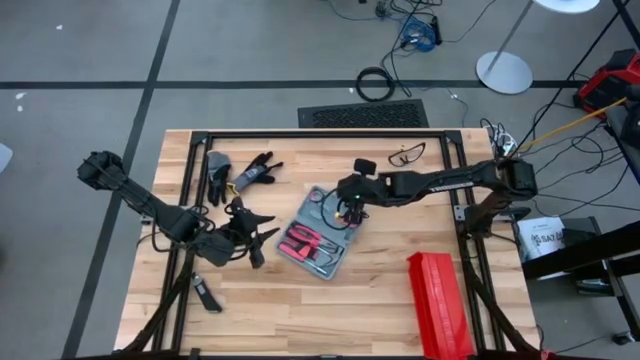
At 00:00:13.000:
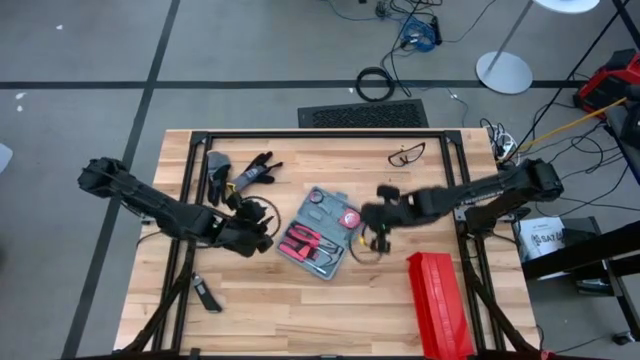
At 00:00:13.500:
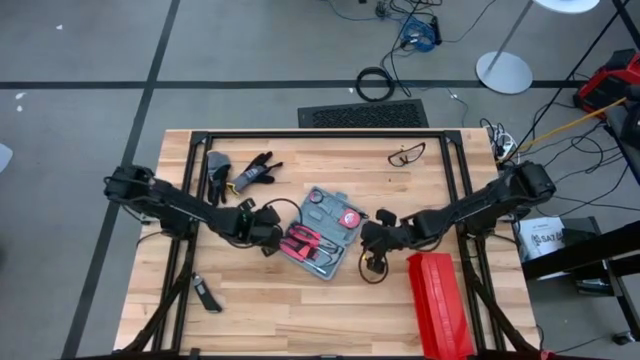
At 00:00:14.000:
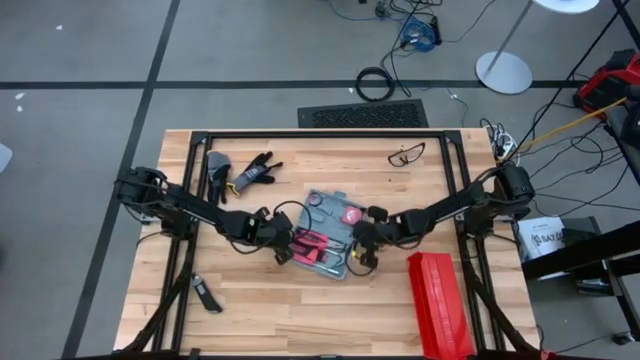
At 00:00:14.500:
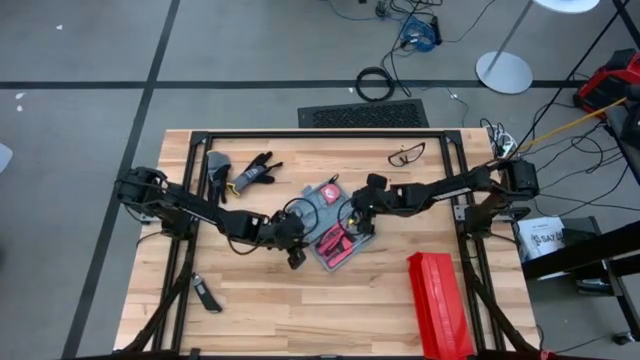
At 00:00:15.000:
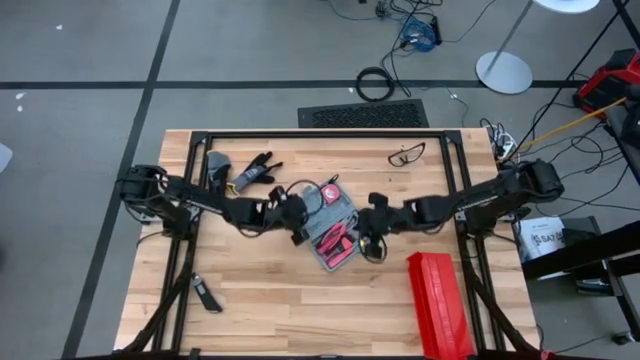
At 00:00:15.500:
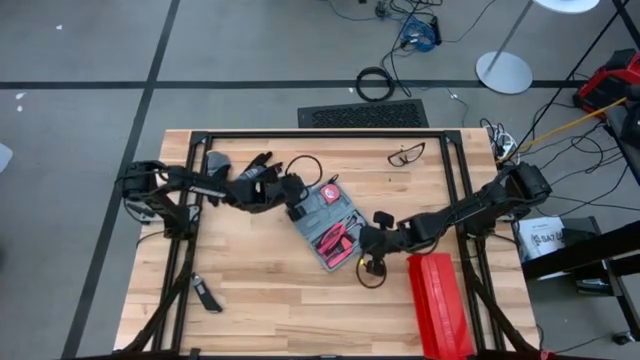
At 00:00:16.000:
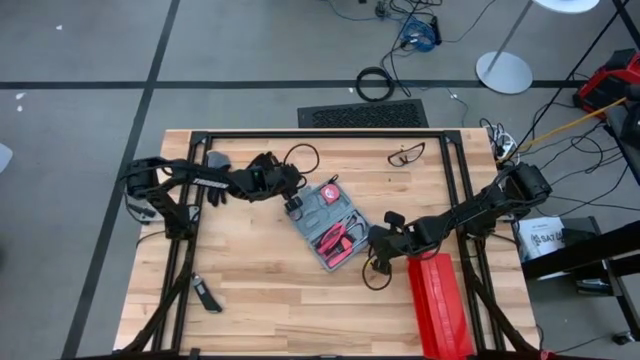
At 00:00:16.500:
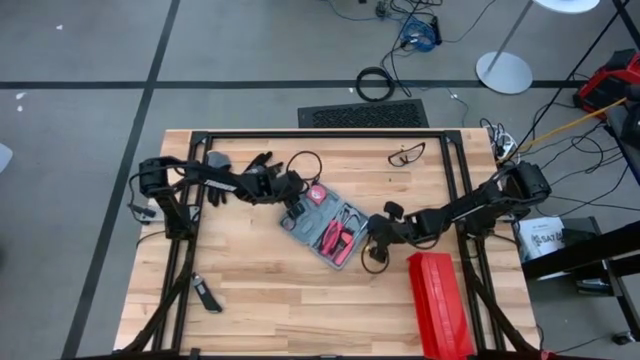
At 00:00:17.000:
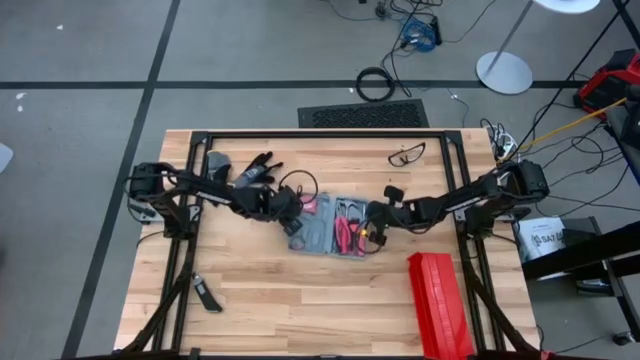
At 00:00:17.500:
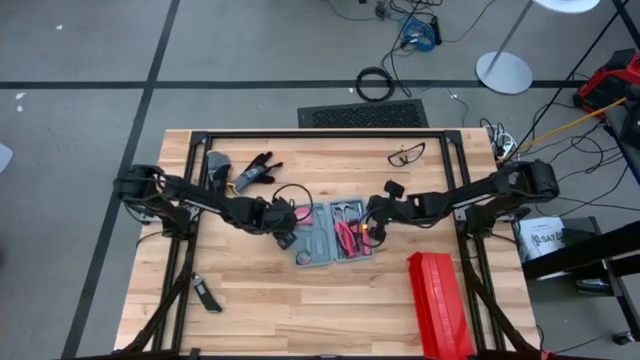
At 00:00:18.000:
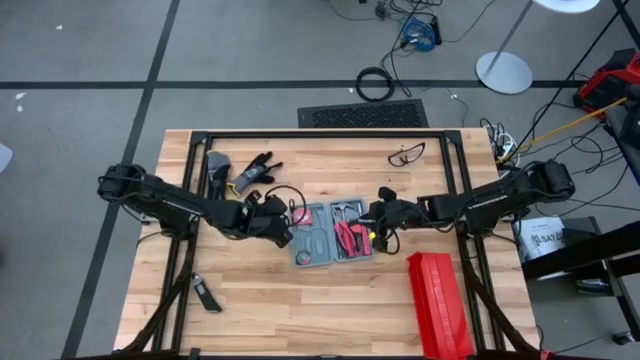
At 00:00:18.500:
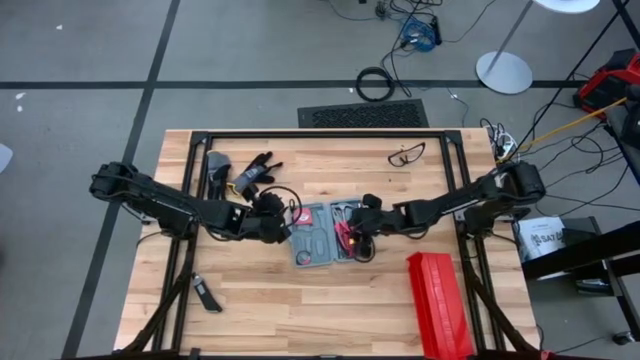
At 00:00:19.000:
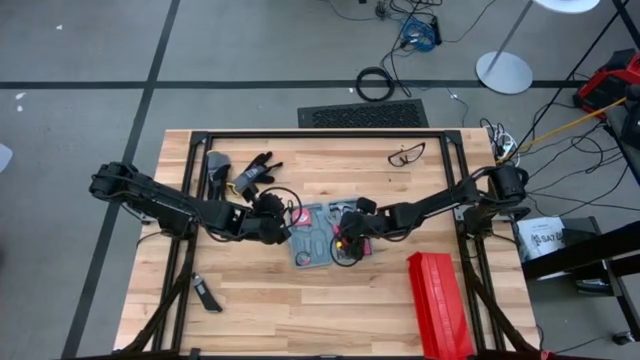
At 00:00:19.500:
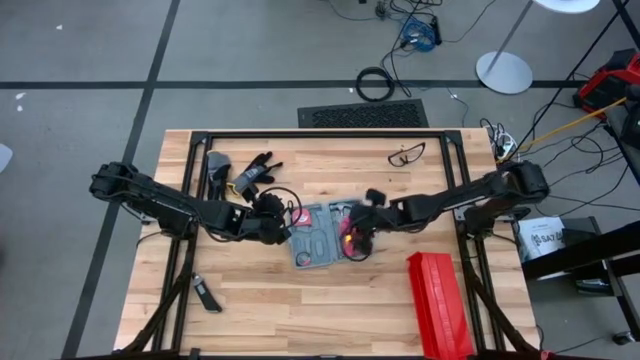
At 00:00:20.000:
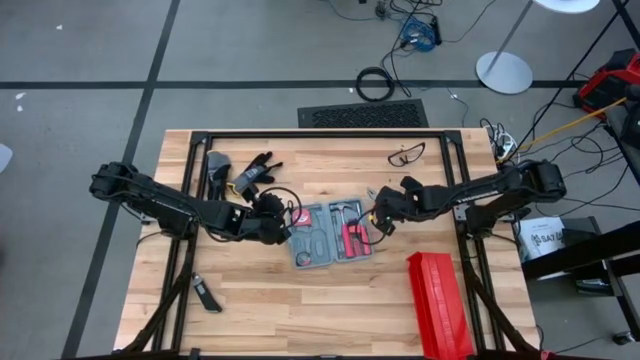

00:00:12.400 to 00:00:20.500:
Task: prefit tool cases
Remove the red pliers from the gray prefit tools case

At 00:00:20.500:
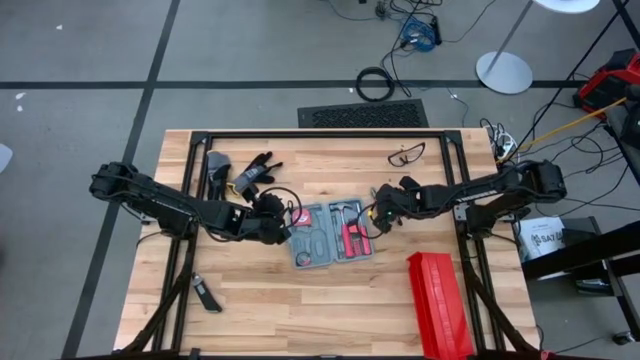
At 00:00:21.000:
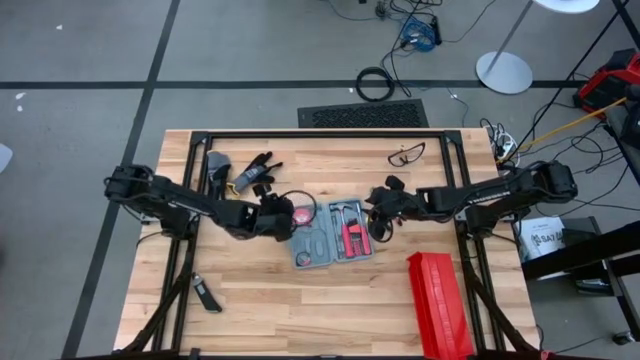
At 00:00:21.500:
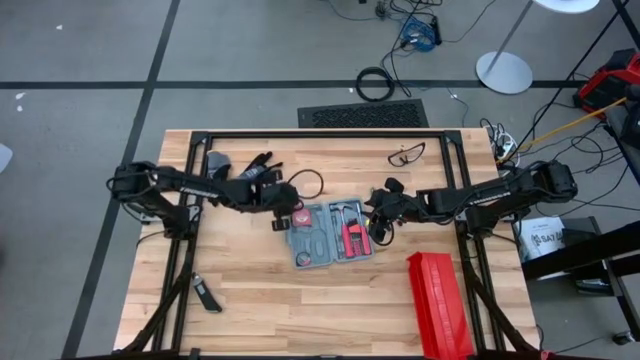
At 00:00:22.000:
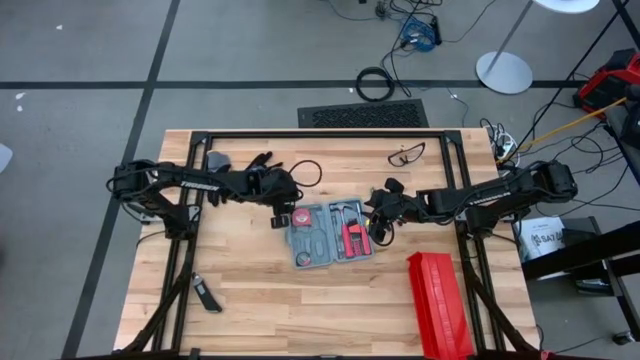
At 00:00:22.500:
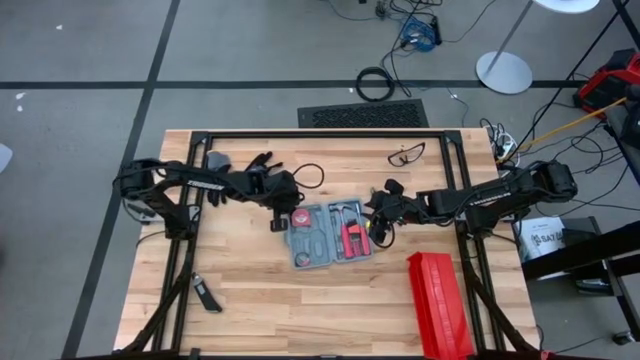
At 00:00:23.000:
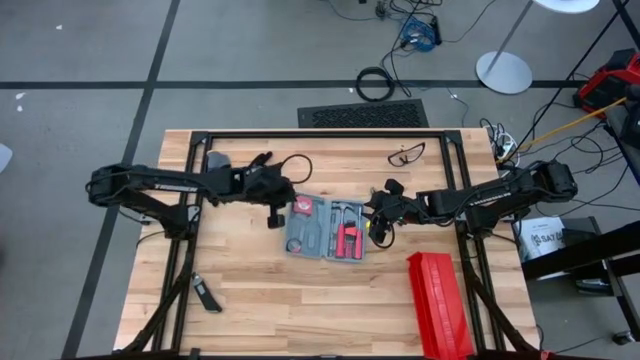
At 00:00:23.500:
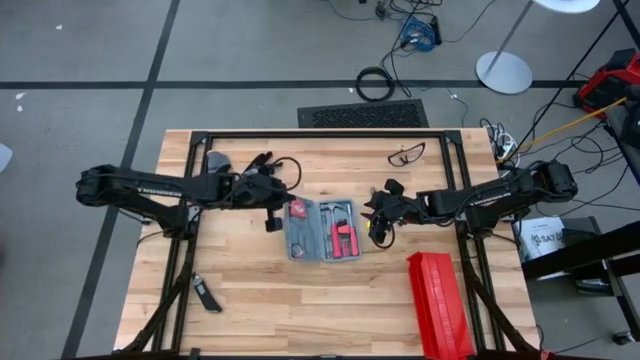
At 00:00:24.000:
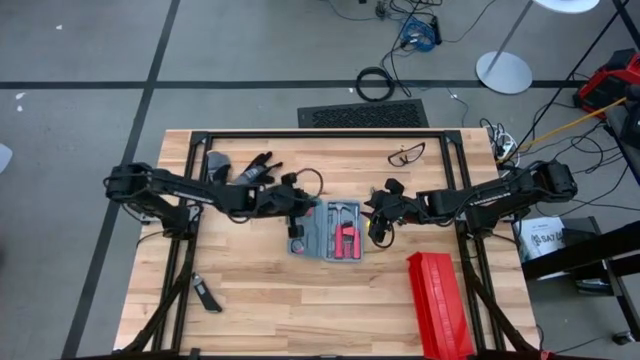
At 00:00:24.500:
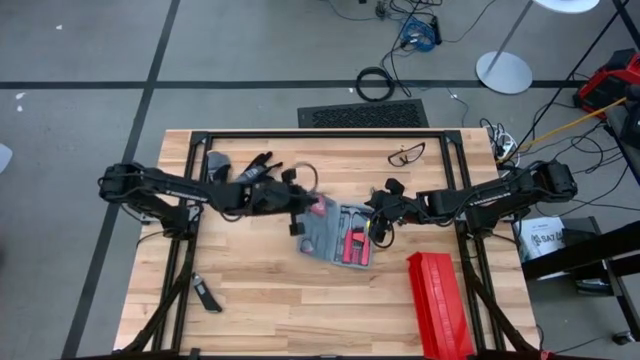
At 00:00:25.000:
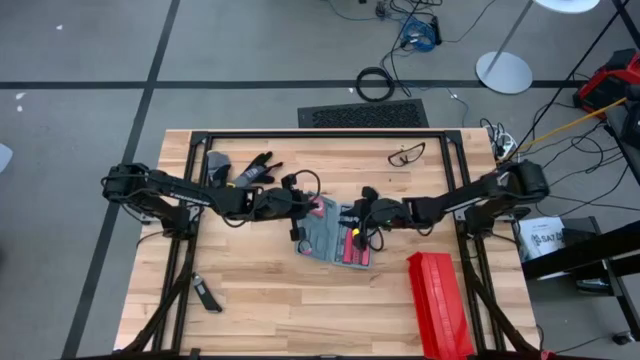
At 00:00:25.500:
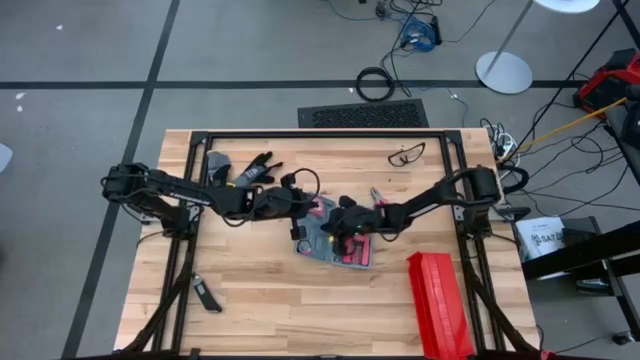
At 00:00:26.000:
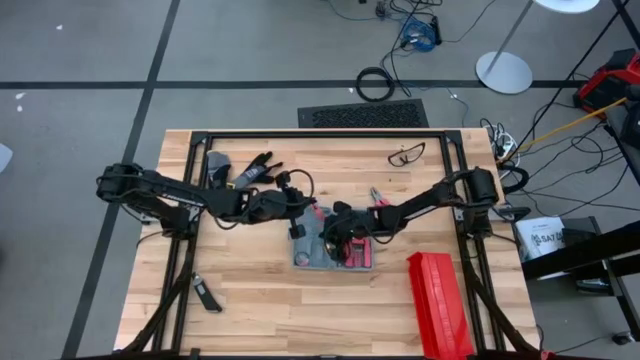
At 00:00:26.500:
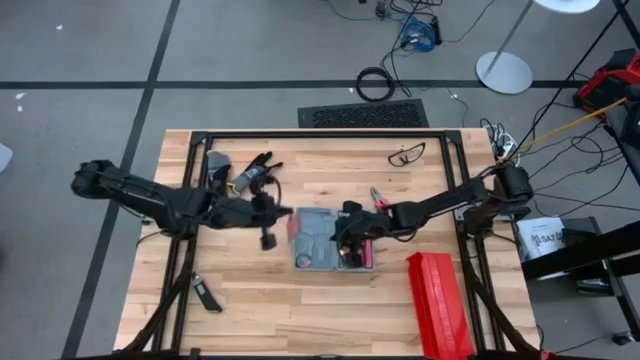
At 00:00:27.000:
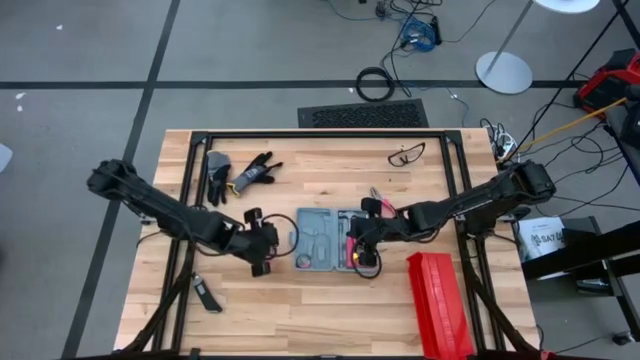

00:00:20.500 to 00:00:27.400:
Remove the red tape measure from the gray prefit tools case

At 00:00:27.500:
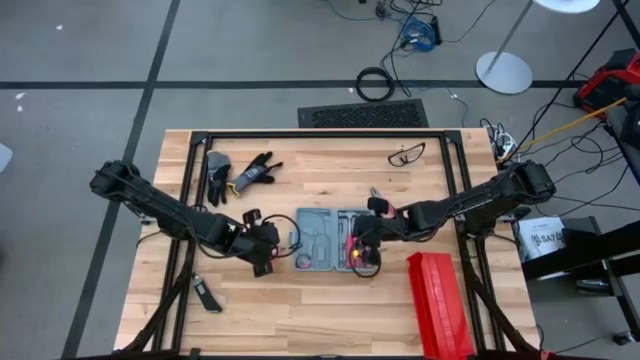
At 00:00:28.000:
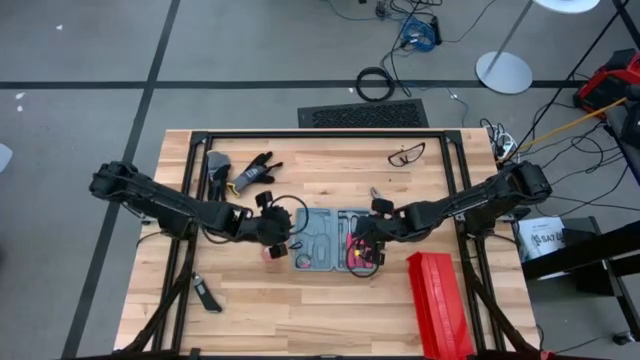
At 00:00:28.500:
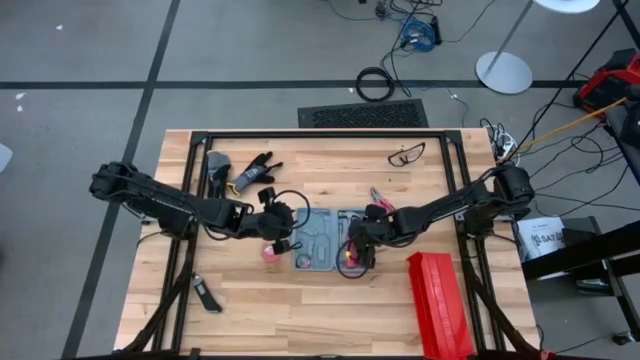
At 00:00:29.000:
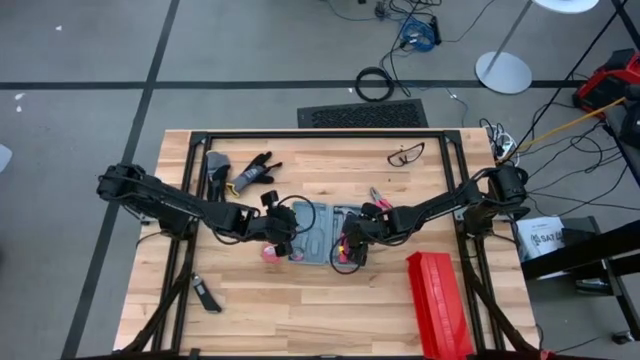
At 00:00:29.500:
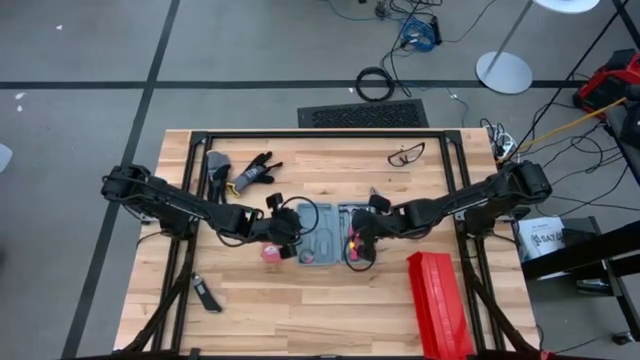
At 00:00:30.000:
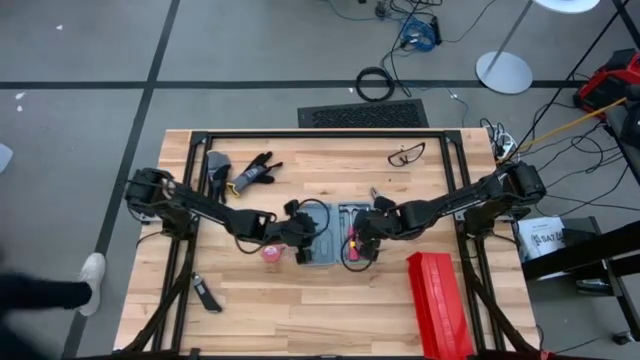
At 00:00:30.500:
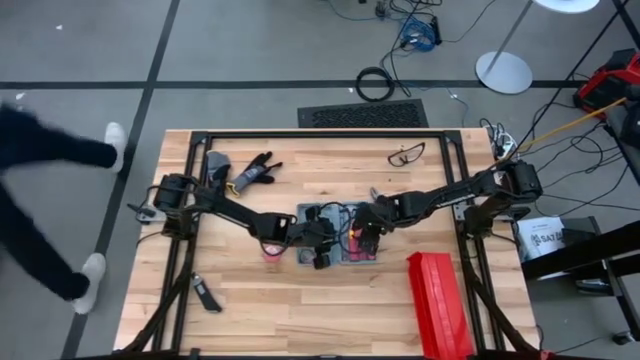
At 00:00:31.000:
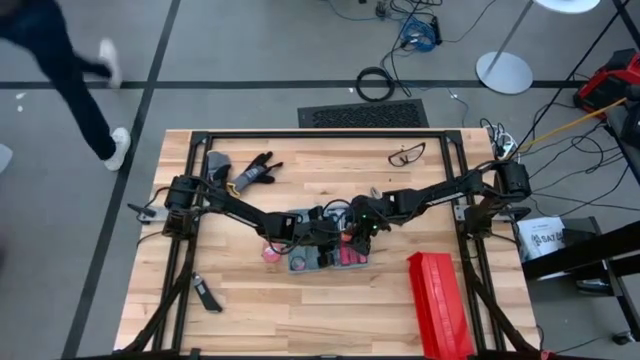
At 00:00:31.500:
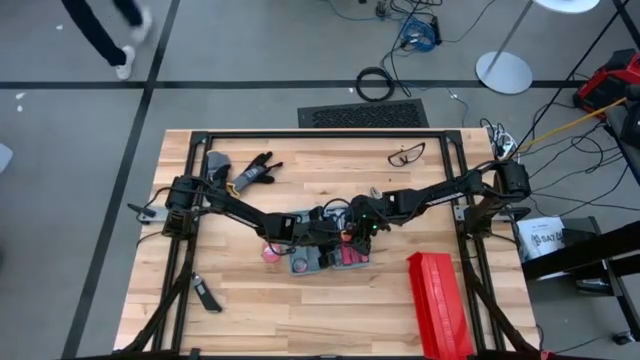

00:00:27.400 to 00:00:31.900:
Remove the red allen wrench from the gray prefit tools case

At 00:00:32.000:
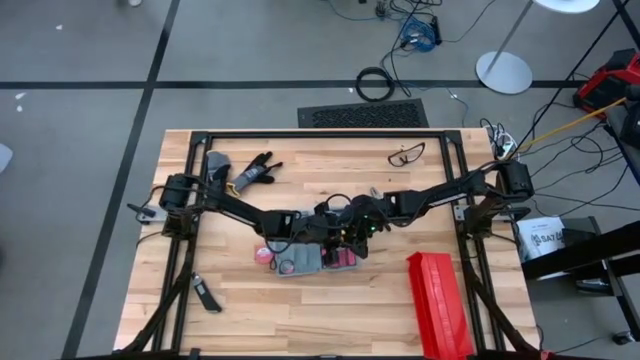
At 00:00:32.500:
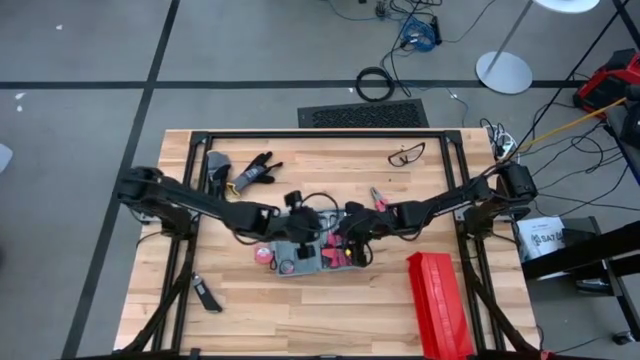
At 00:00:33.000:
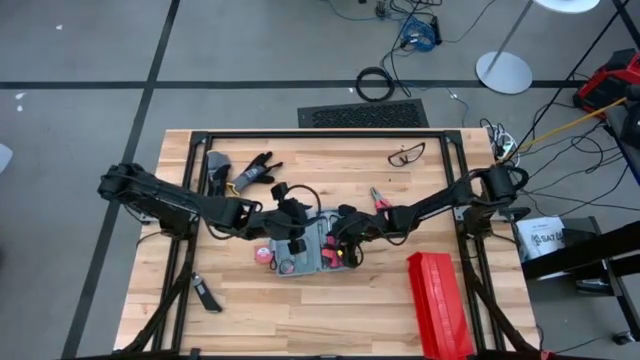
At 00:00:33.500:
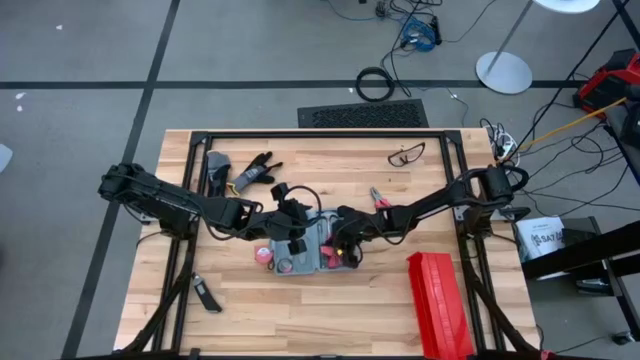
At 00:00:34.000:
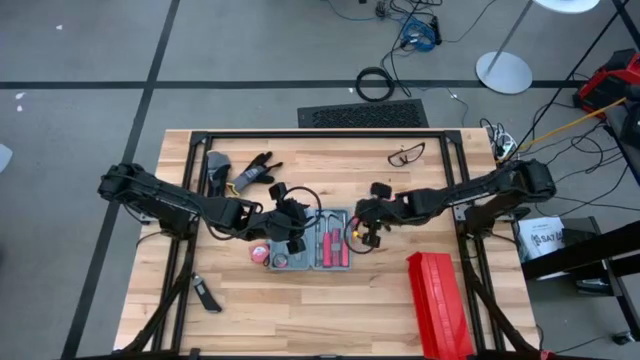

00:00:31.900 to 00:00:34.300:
Remove the red allen wrench from the gray prefit tools case

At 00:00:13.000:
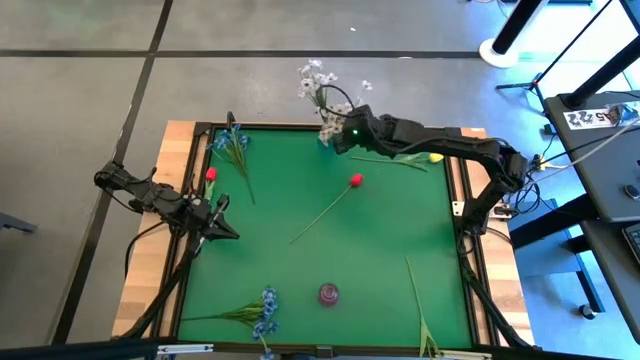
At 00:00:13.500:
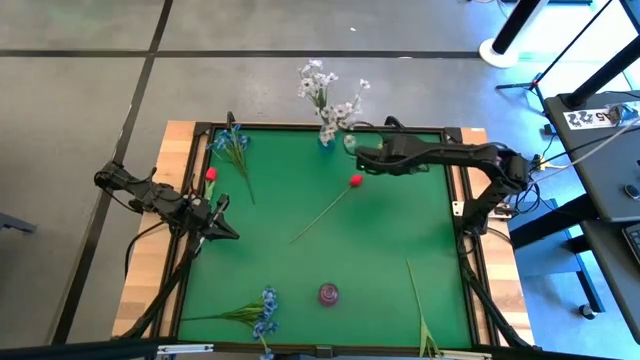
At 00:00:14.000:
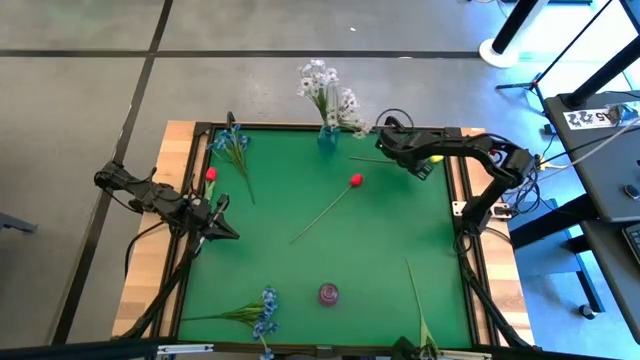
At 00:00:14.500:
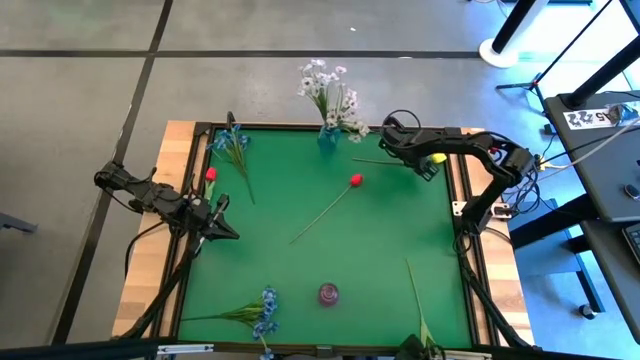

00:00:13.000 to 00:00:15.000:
Task: Sort flowers into vase by color
Put the top yellow tulip into the blue flower vase
